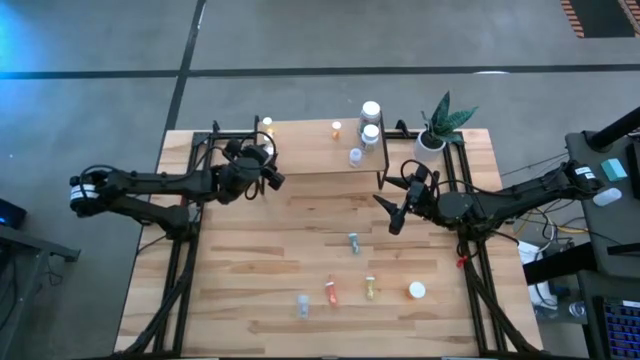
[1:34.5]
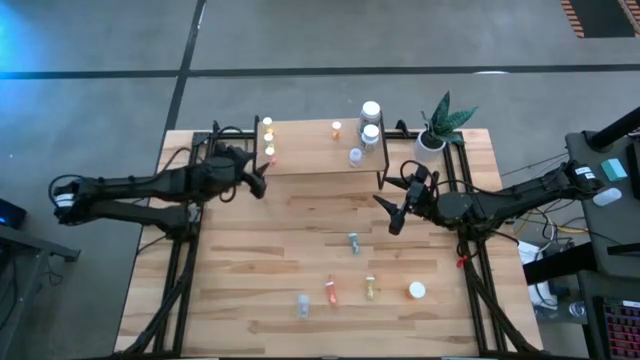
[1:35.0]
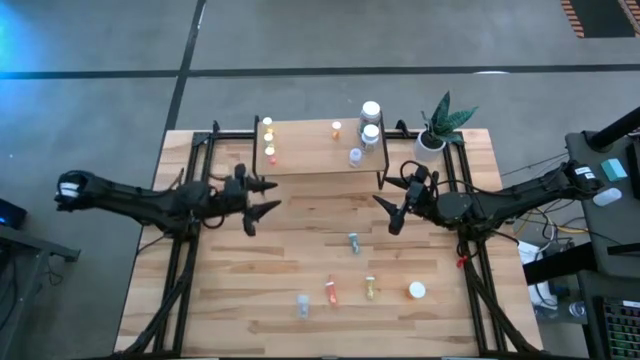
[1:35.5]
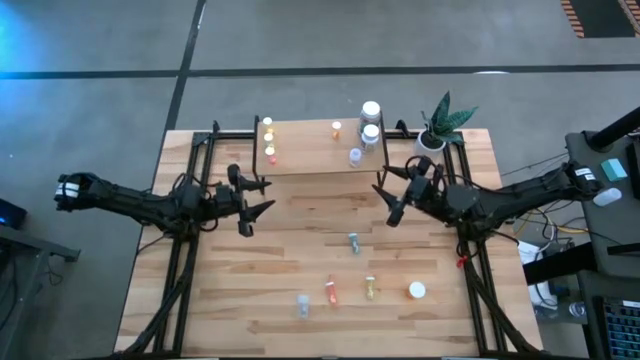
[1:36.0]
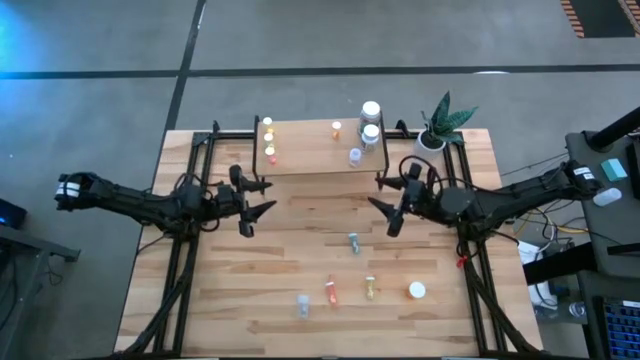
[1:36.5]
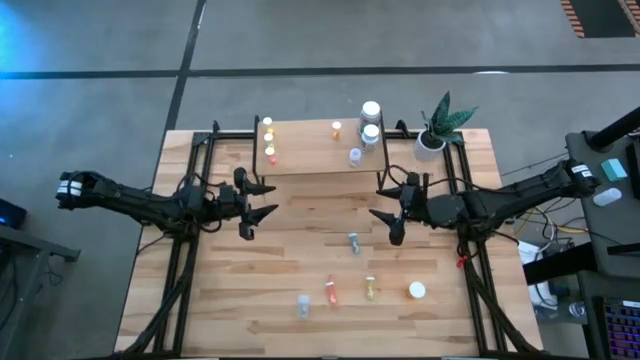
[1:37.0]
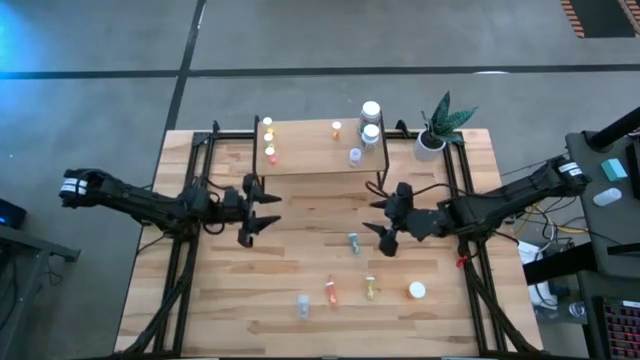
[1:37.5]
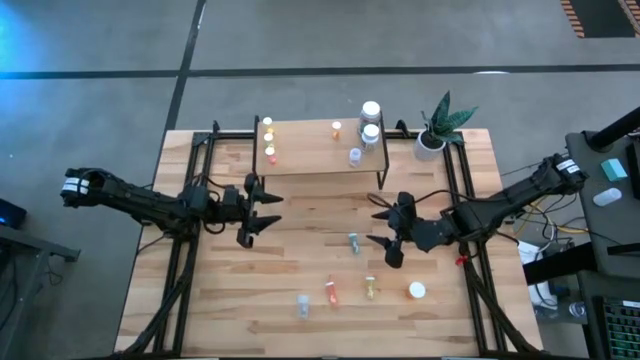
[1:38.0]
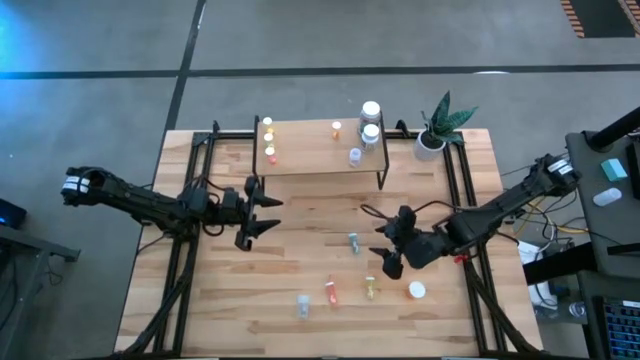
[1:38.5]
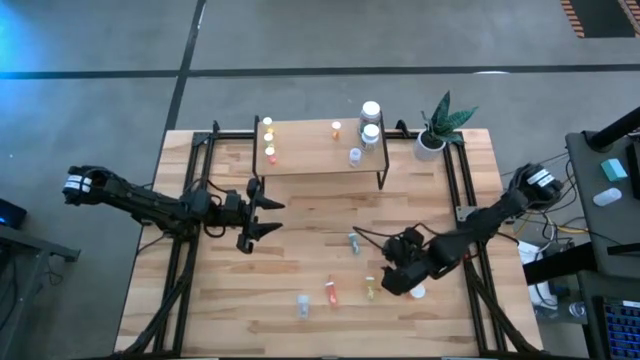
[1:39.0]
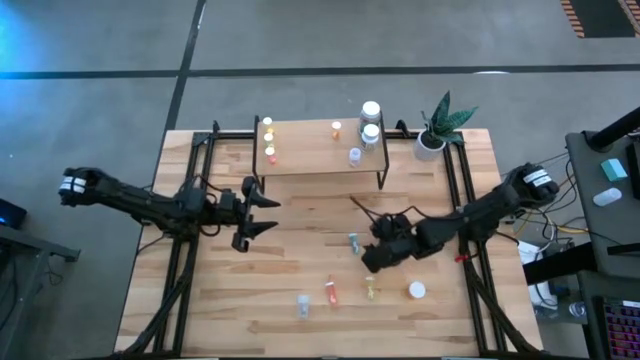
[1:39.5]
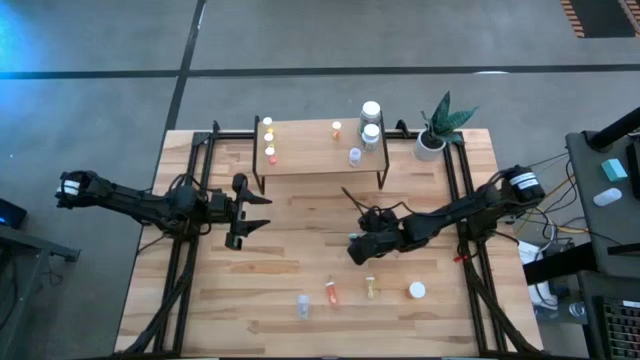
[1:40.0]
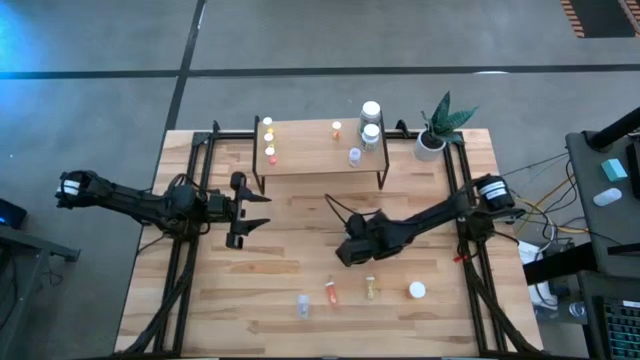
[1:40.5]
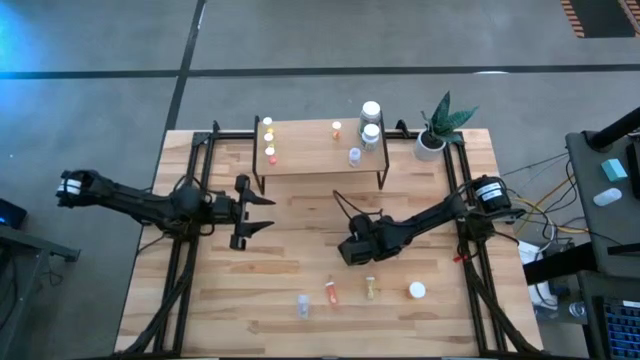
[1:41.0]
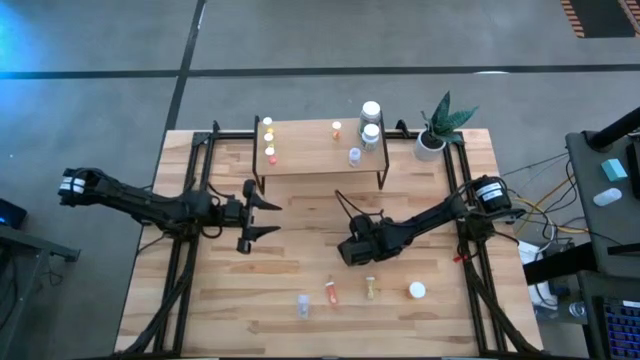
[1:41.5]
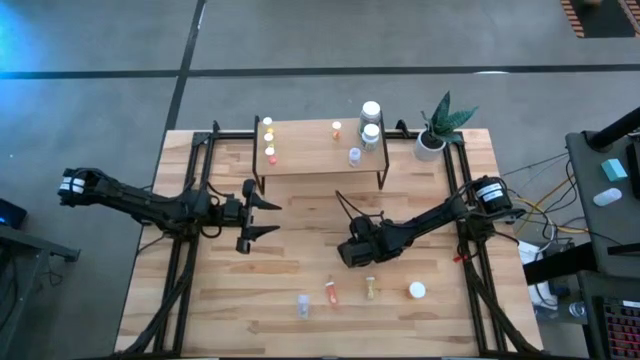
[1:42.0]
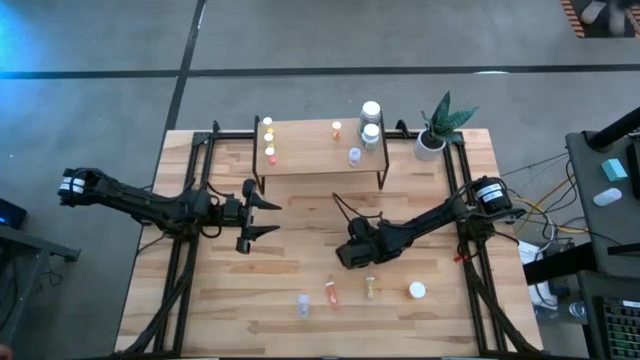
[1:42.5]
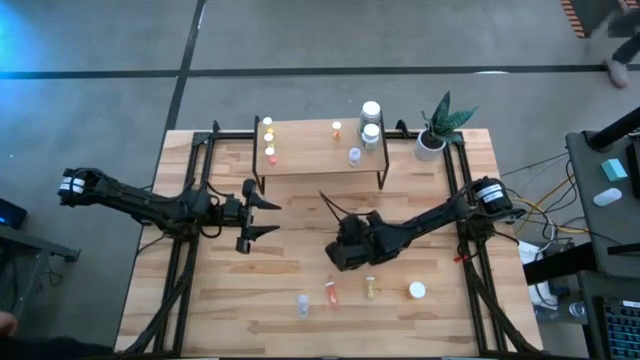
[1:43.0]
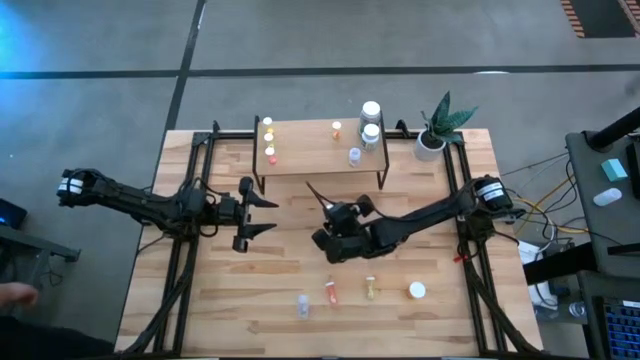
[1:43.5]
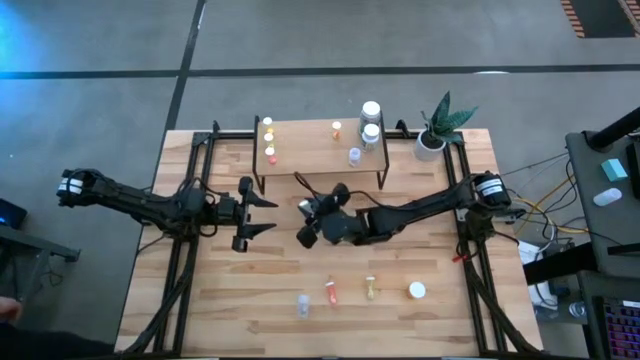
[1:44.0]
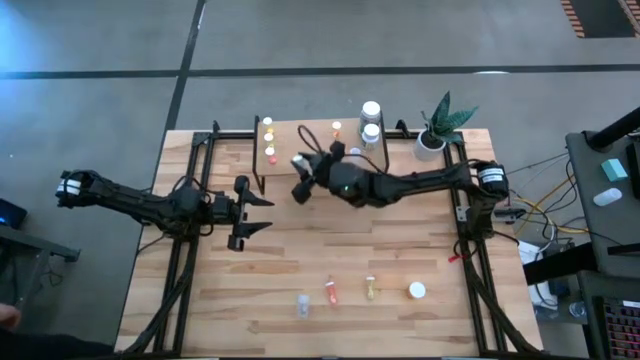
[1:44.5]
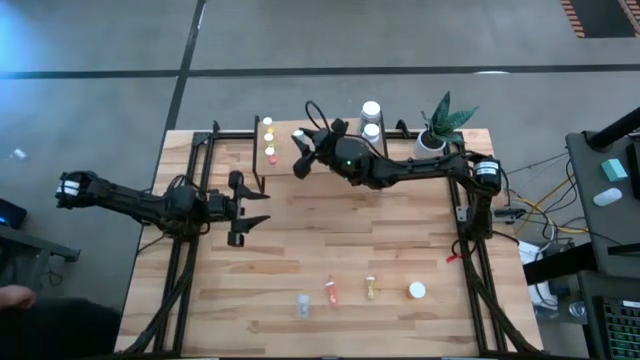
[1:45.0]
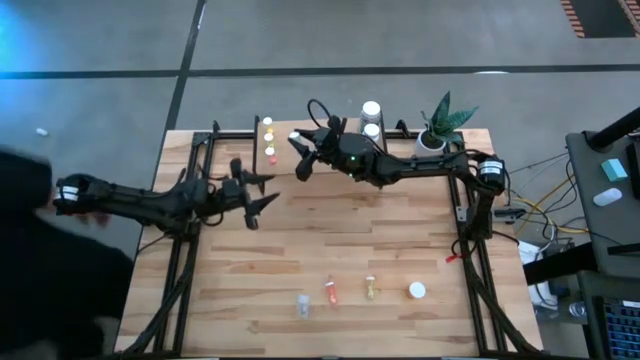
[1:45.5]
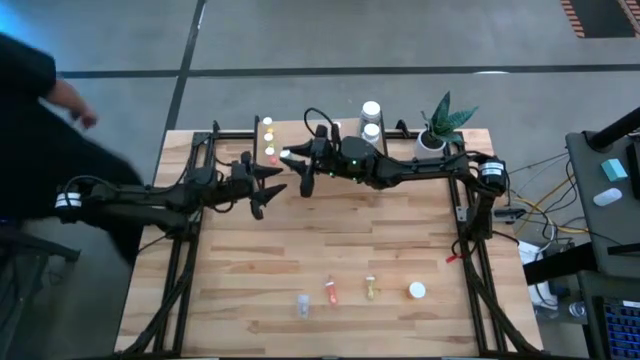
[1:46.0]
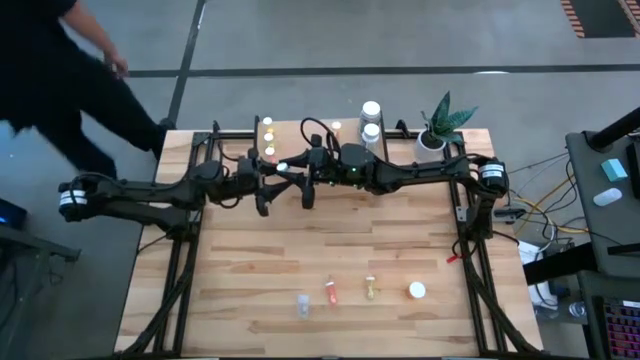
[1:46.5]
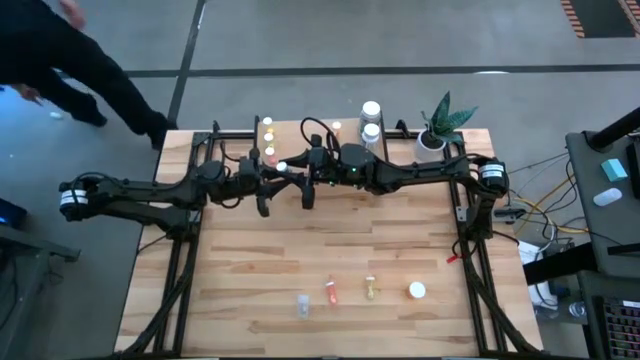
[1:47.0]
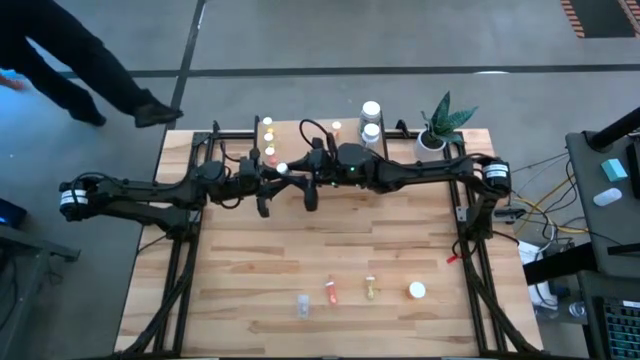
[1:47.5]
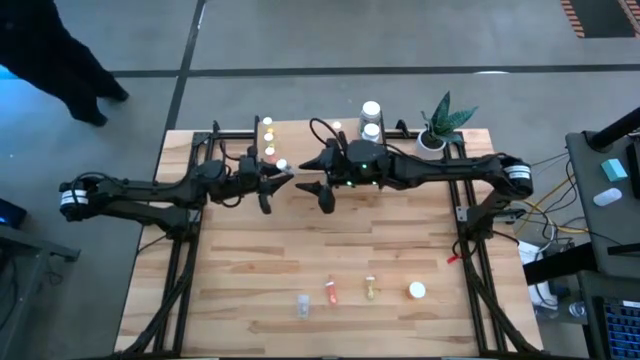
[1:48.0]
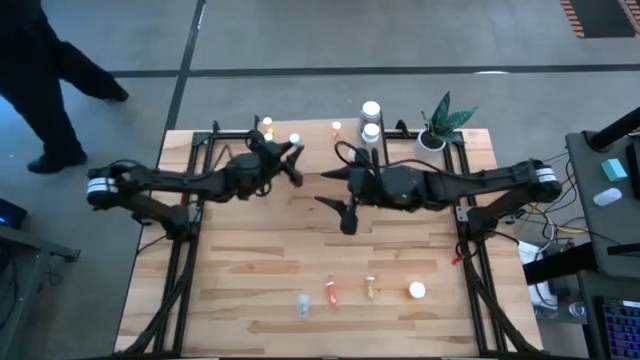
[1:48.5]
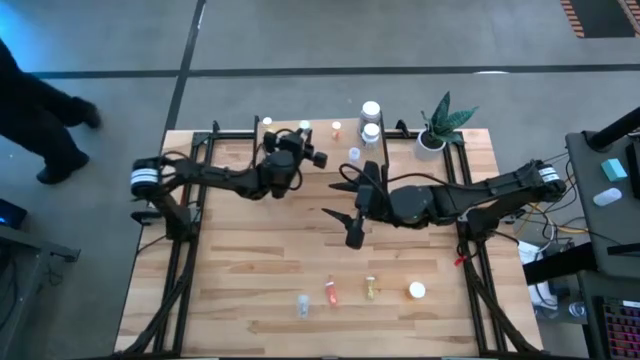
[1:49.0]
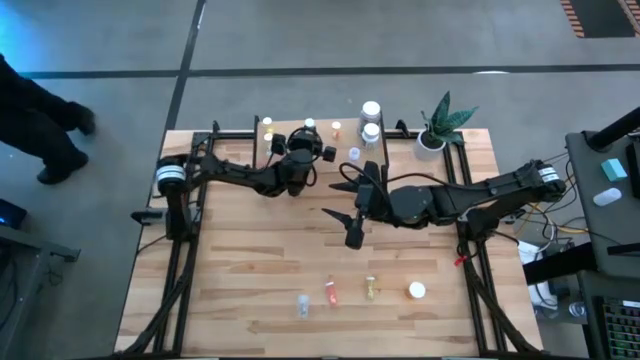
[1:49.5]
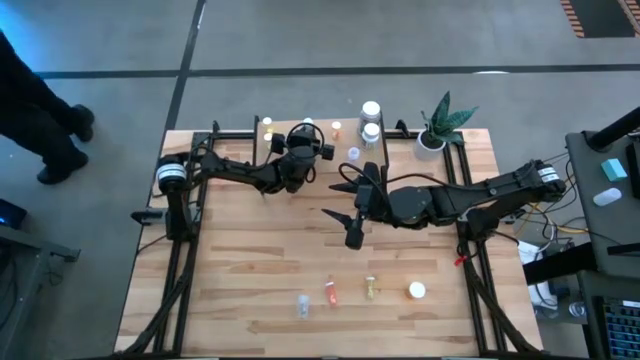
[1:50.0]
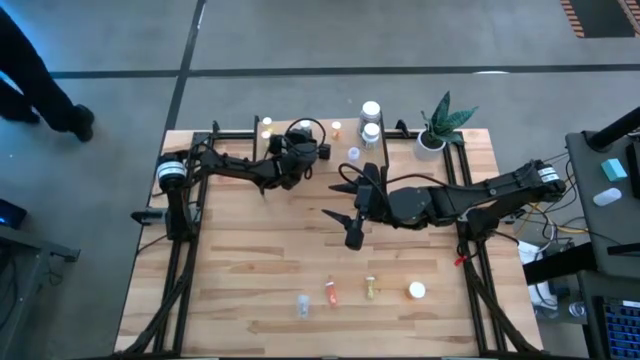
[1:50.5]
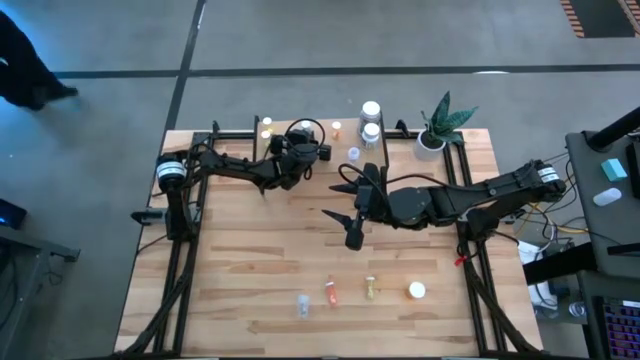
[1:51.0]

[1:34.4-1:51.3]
Task: Pick and place medicine bottles onto shelf by color
Put the blue pill bottle on the shelf

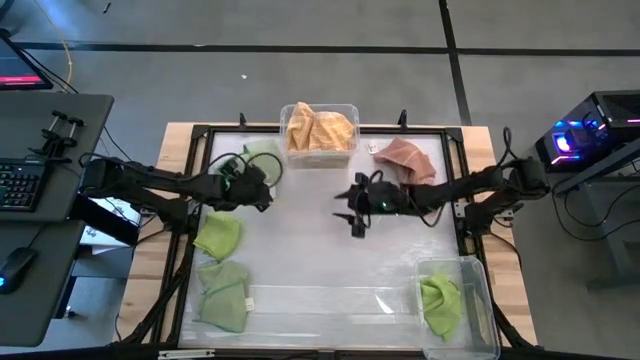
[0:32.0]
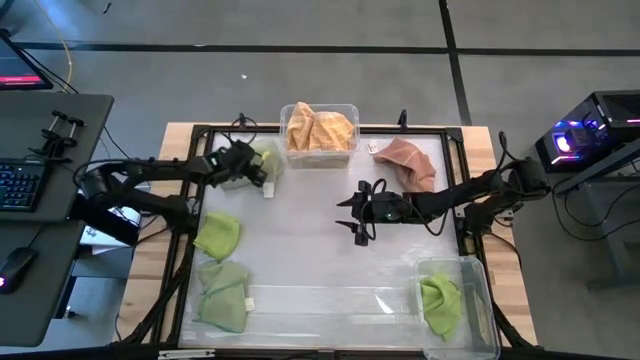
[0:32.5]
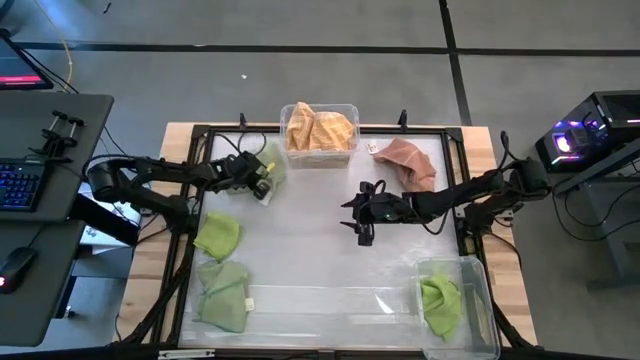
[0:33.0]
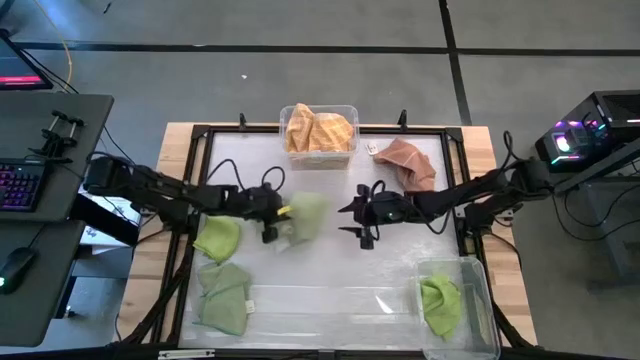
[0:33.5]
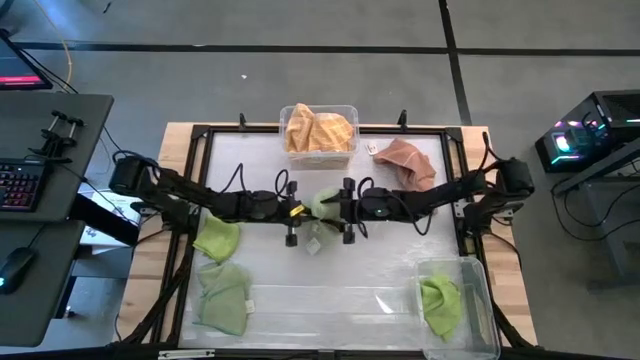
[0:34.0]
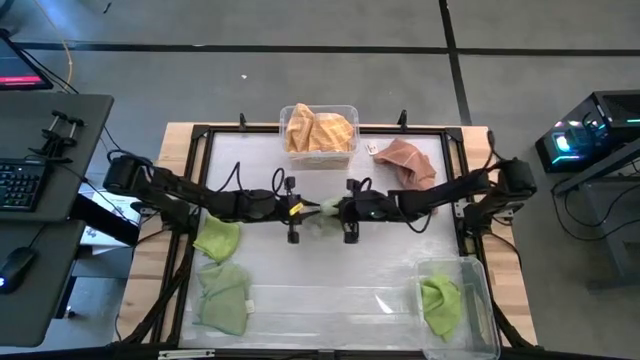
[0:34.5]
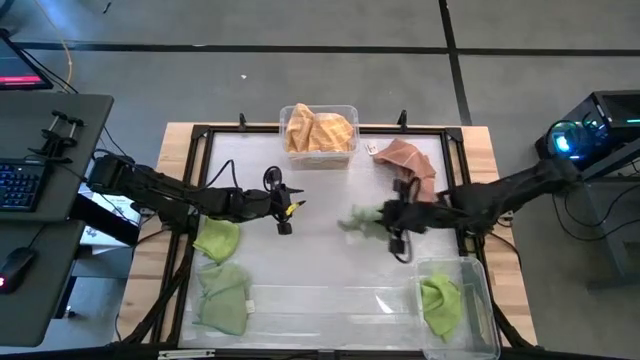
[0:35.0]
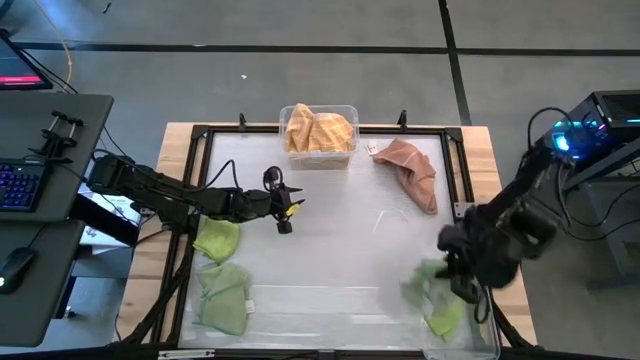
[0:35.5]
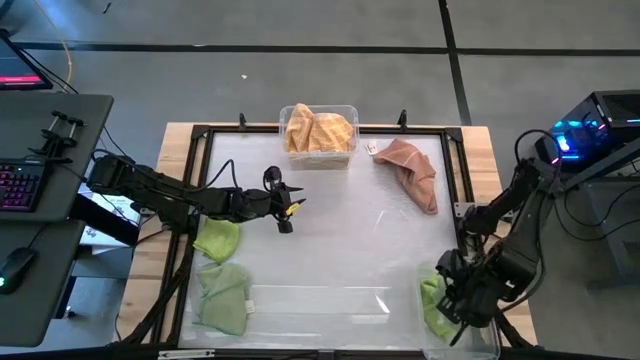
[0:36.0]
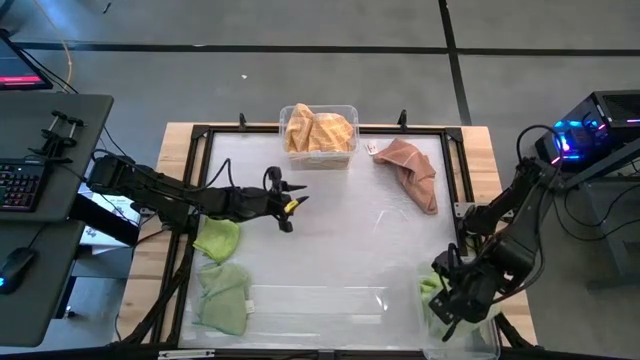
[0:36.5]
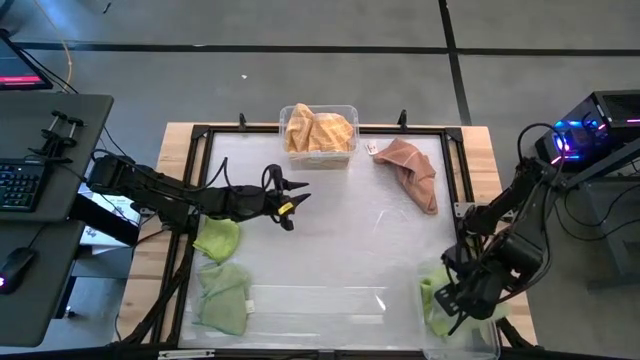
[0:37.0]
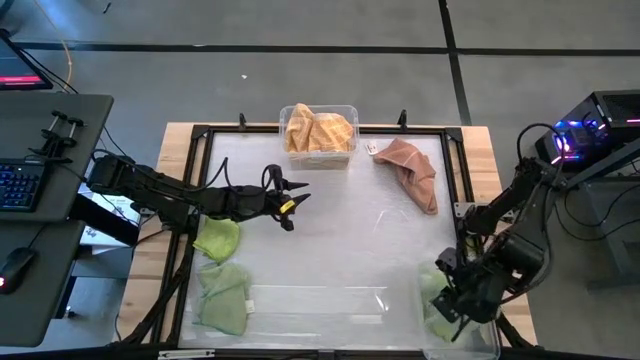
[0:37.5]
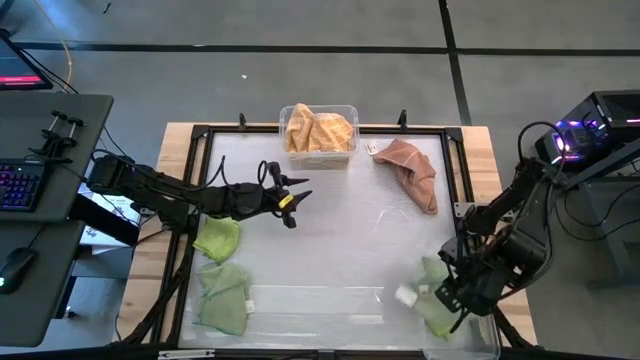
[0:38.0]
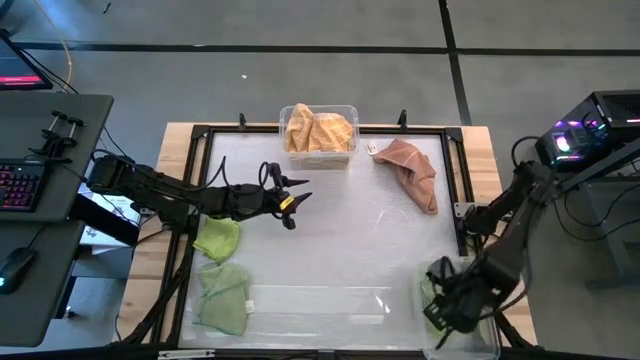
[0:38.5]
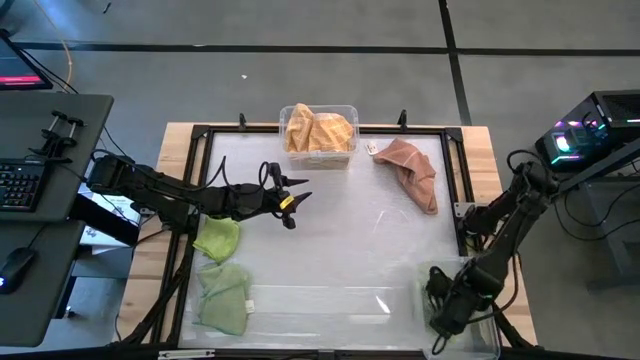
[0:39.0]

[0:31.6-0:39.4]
Task: Sort towels by color in basket
Put the top green towel into the bottom transparent bin
